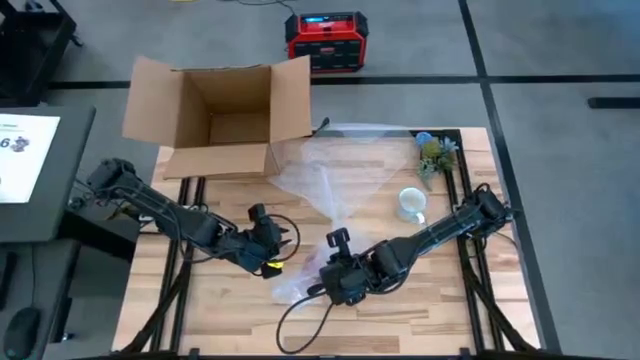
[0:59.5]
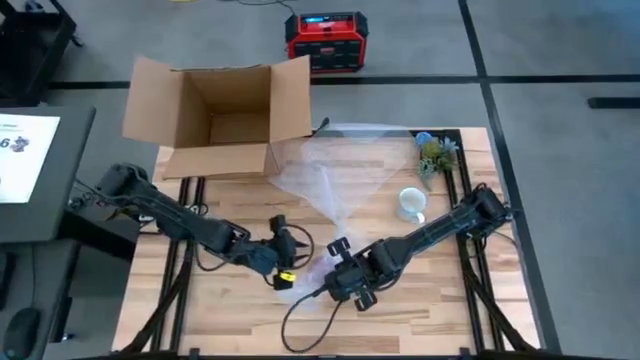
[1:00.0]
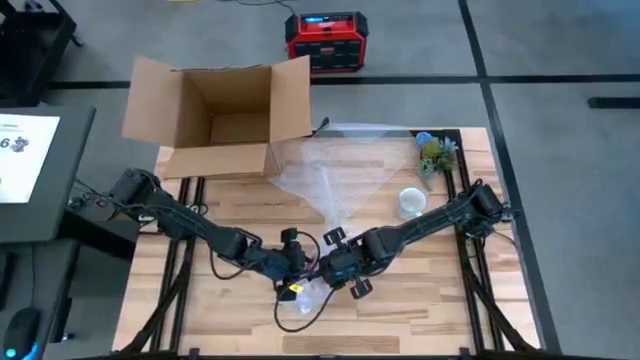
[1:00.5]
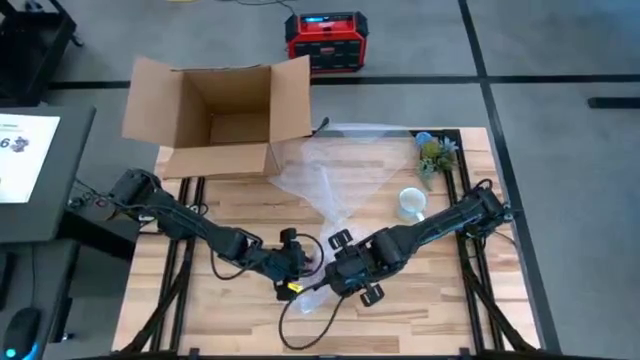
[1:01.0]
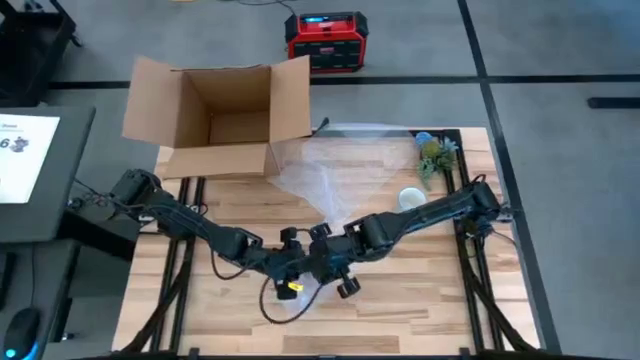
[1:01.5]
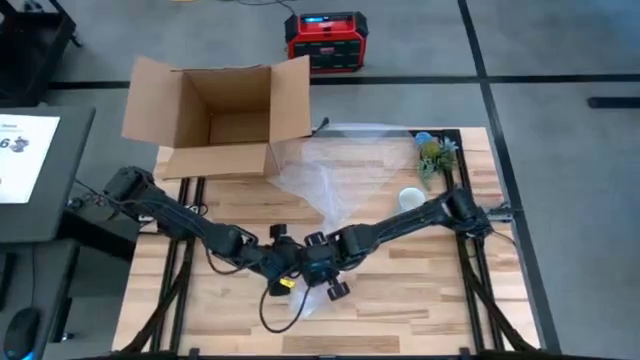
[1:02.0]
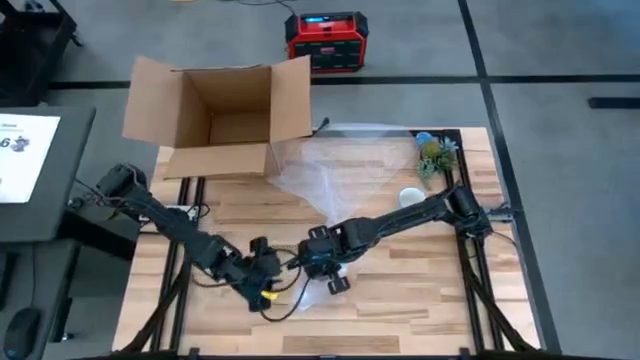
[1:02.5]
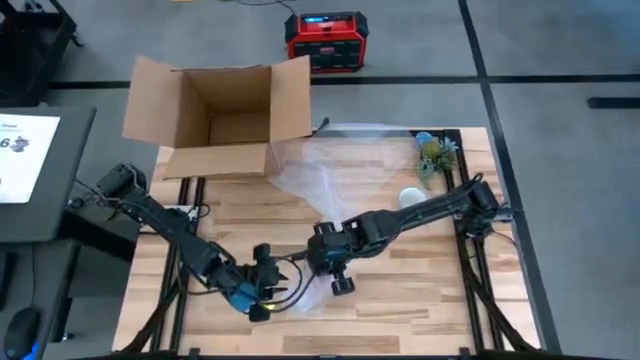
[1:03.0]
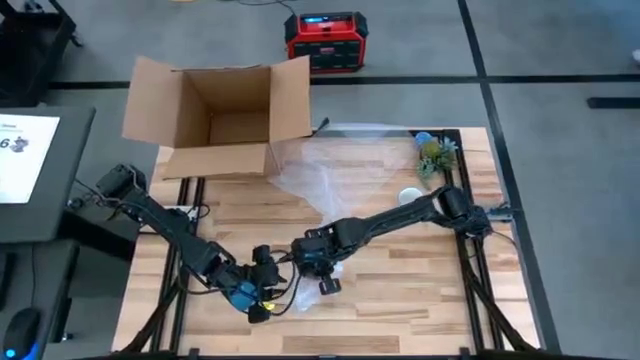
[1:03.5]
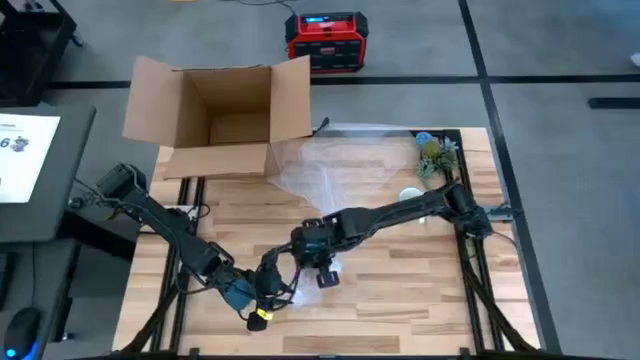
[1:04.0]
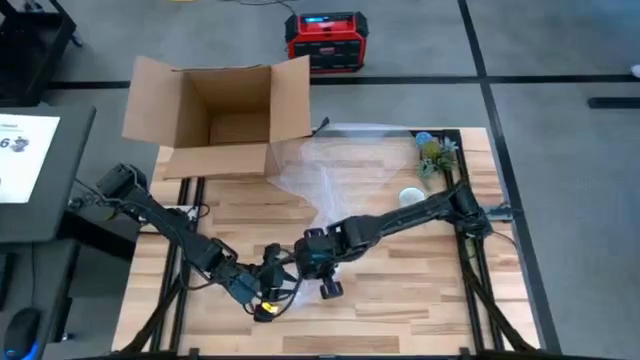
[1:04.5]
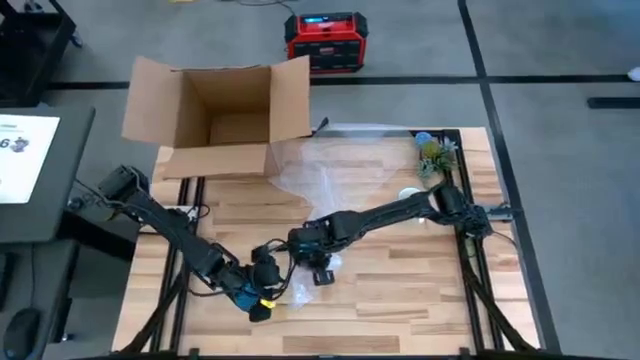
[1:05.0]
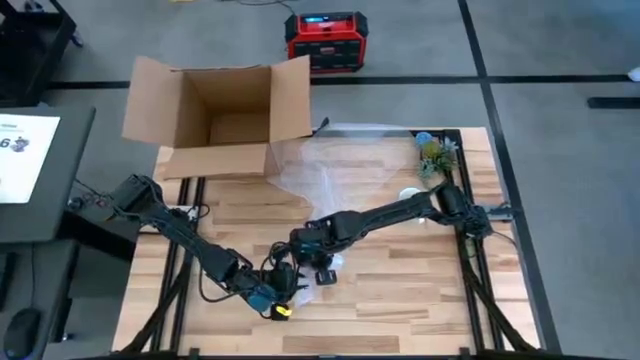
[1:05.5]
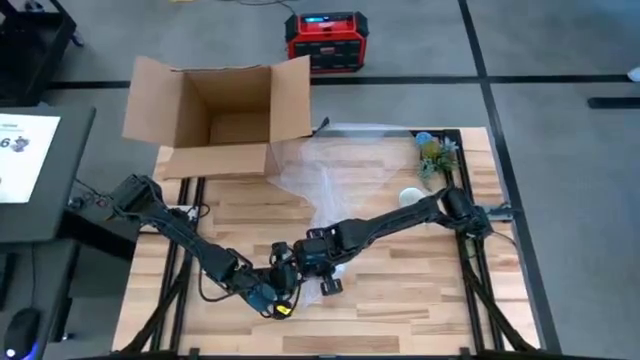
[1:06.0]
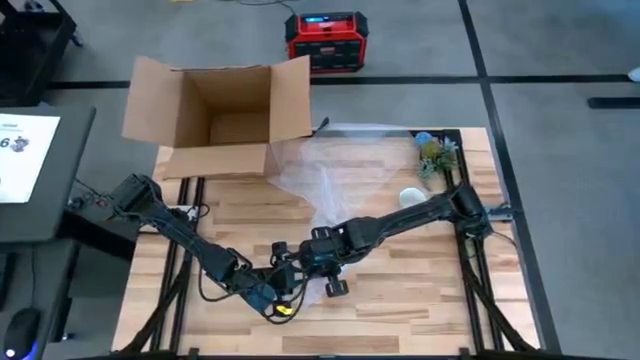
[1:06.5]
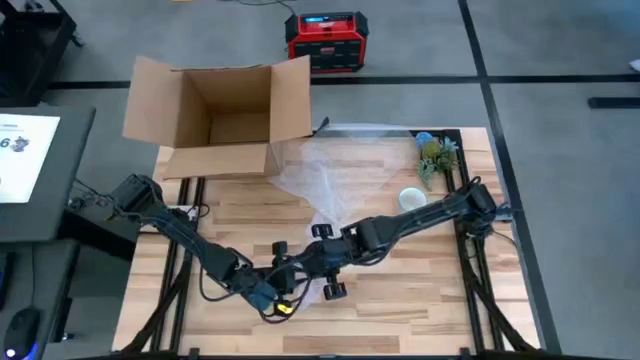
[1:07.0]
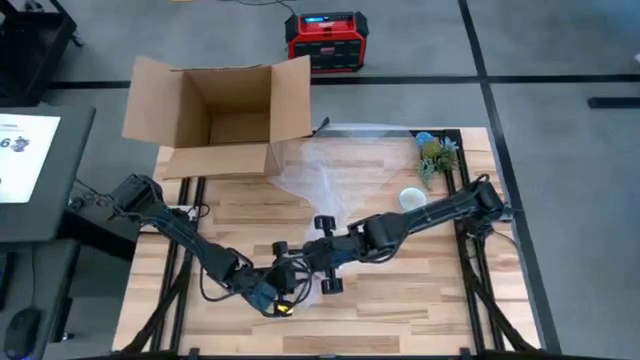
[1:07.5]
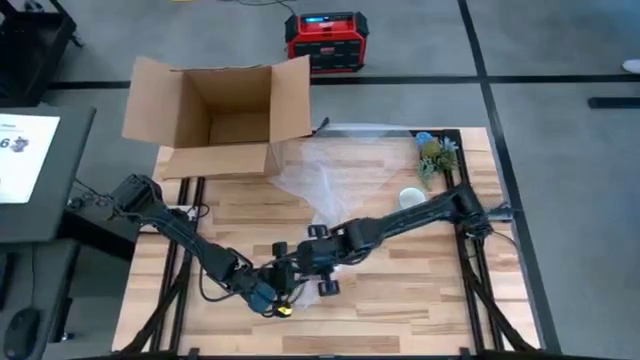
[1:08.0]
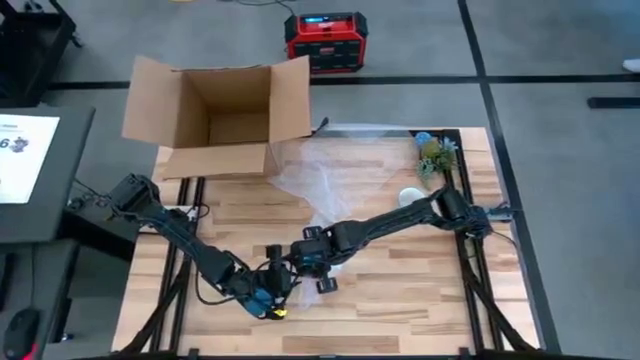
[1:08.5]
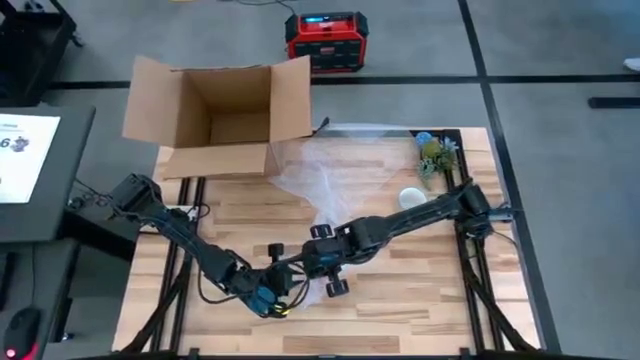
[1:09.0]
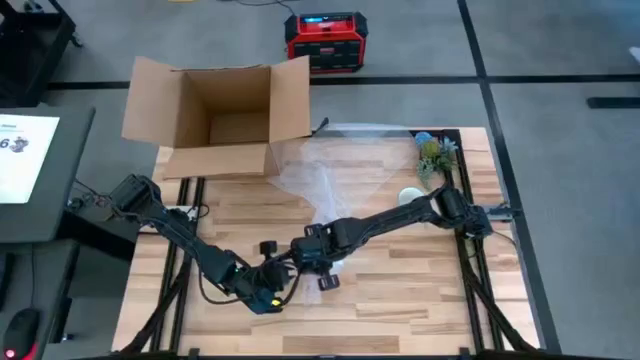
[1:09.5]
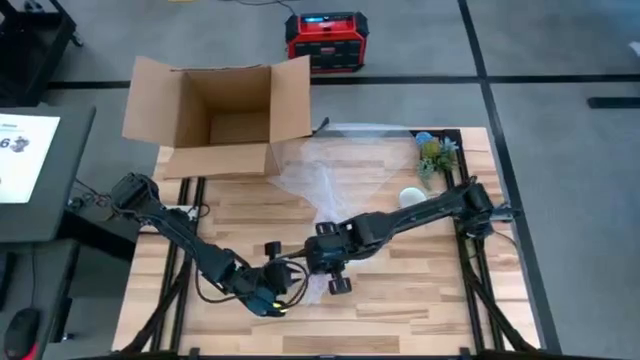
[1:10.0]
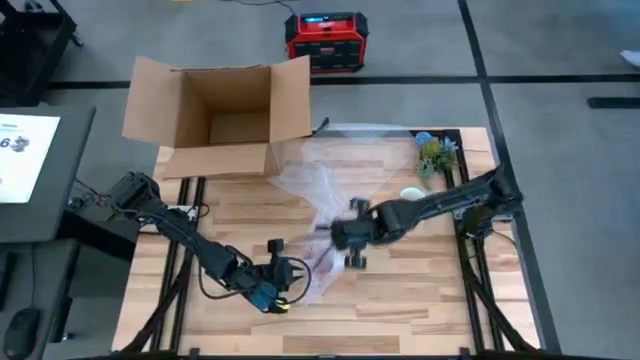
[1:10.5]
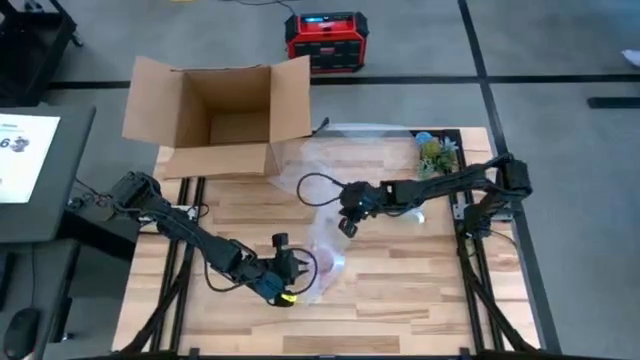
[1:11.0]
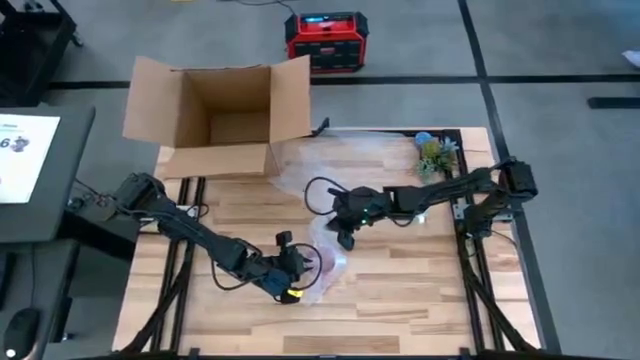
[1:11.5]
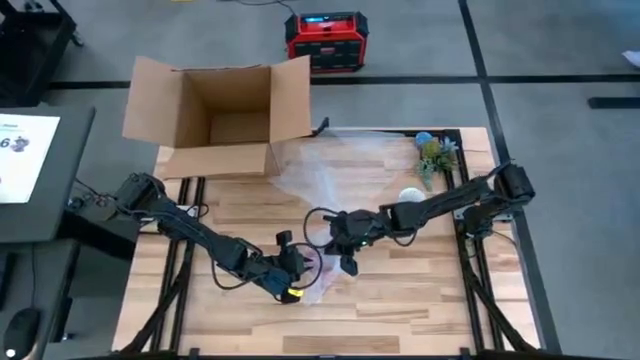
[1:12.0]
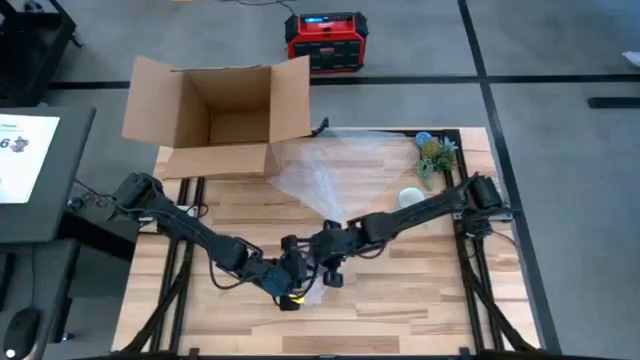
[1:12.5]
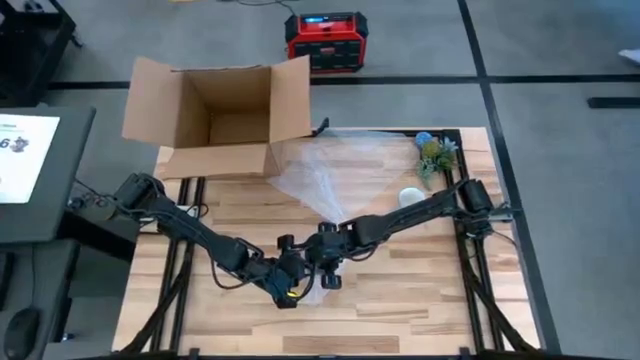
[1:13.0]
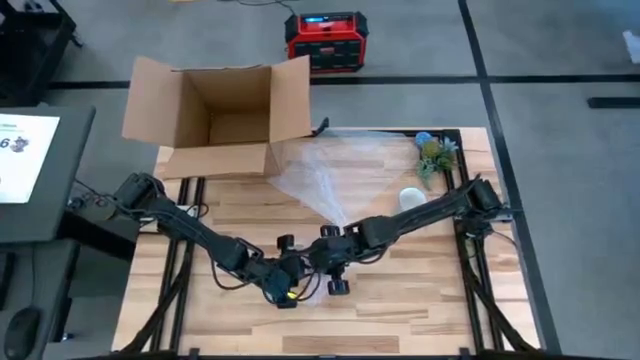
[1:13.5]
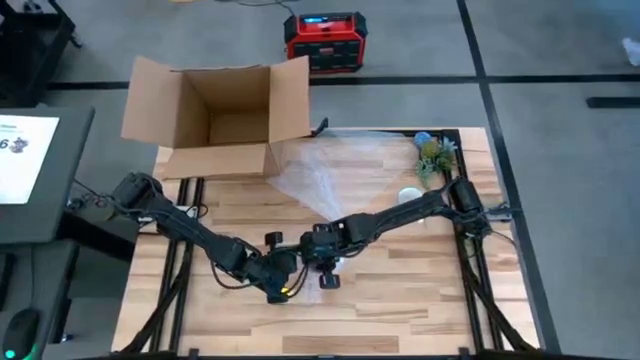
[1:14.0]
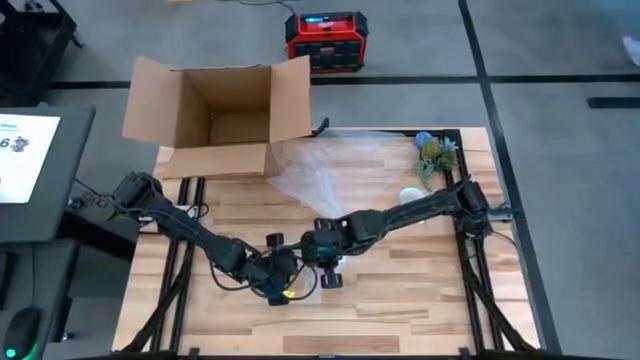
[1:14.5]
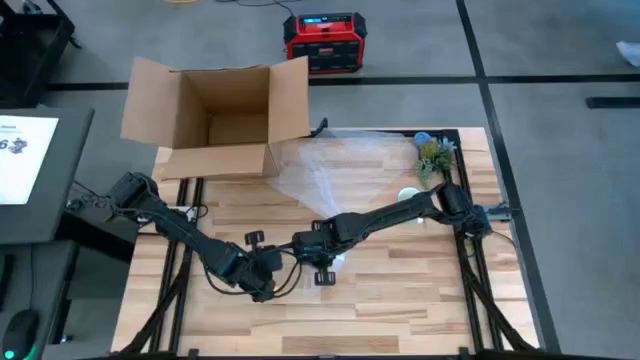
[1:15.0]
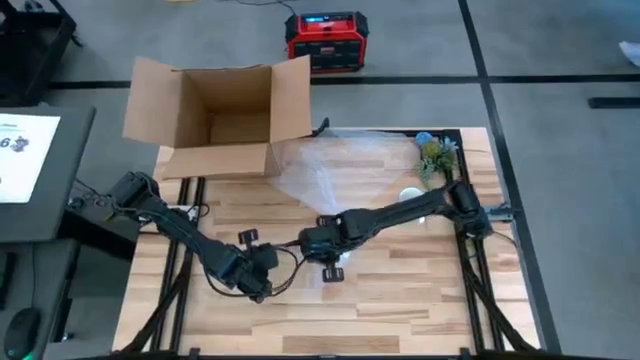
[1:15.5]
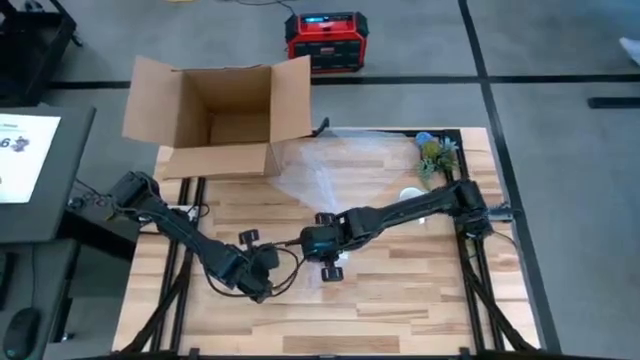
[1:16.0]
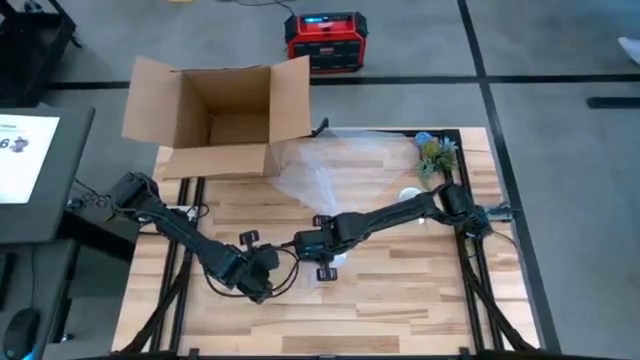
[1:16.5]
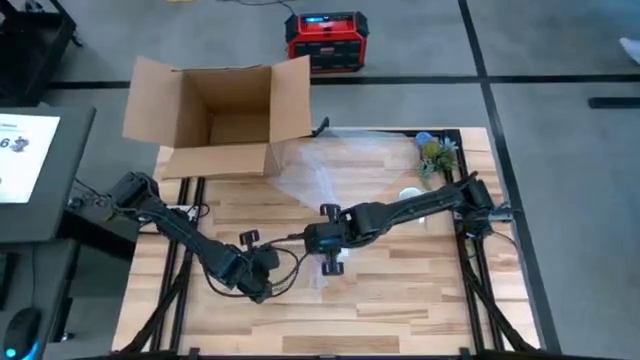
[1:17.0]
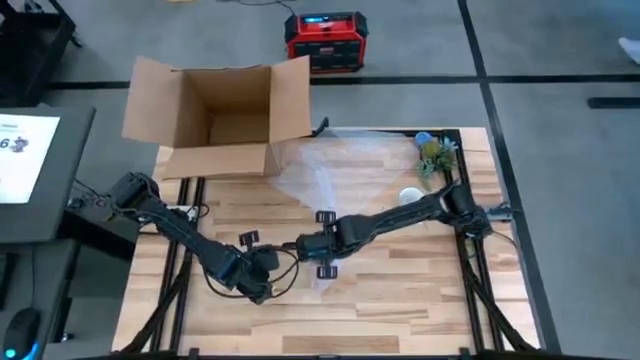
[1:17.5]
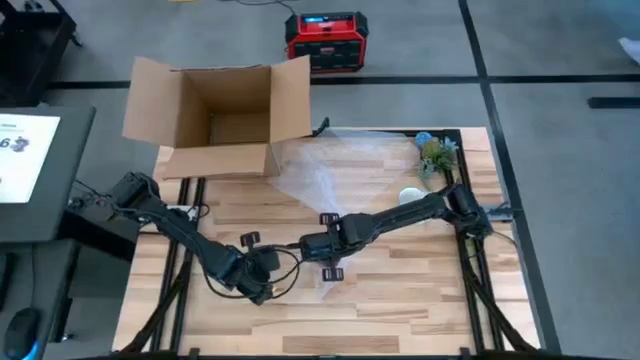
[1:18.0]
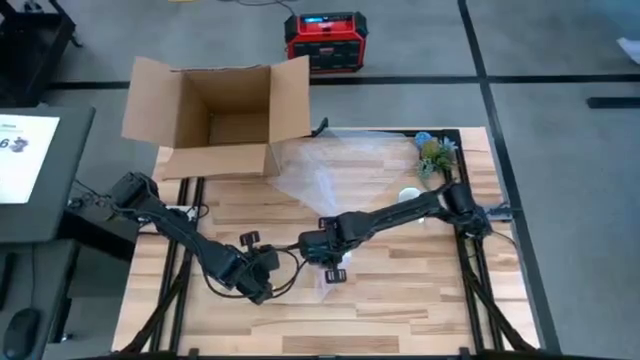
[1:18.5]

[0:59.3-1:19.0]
Task: wrap mug
Wrap the red mug with bubble wrap

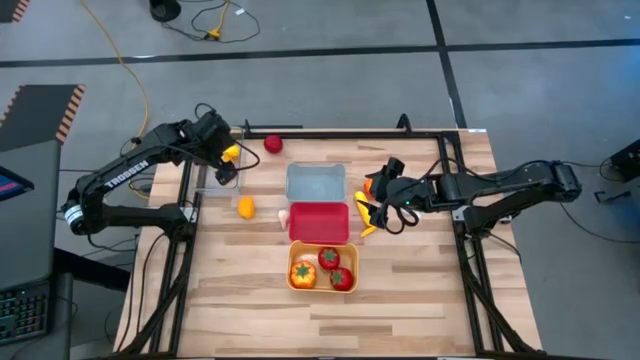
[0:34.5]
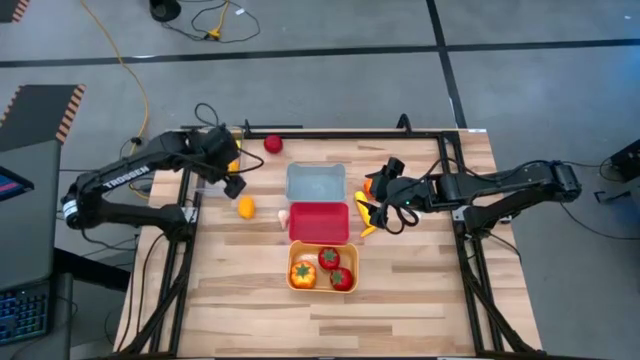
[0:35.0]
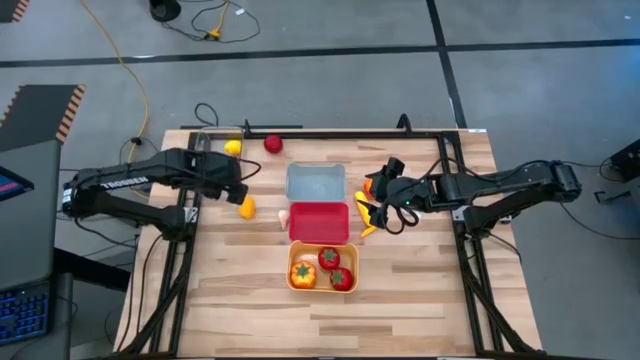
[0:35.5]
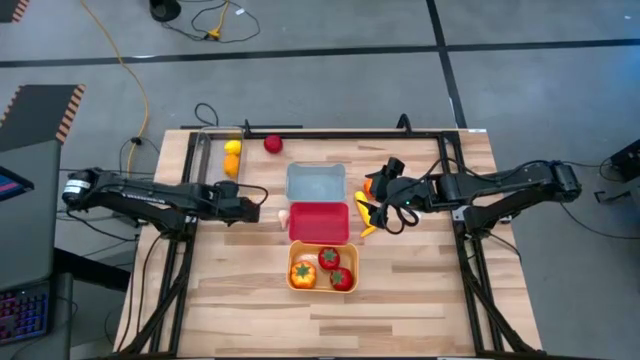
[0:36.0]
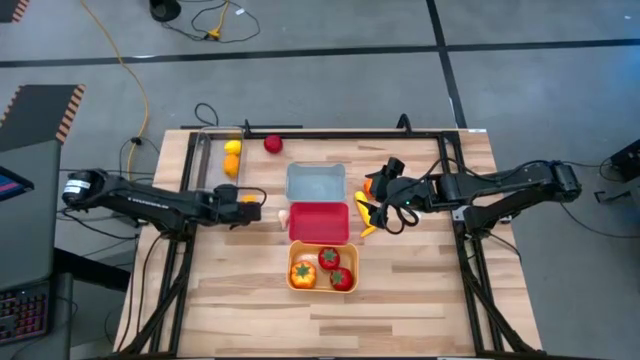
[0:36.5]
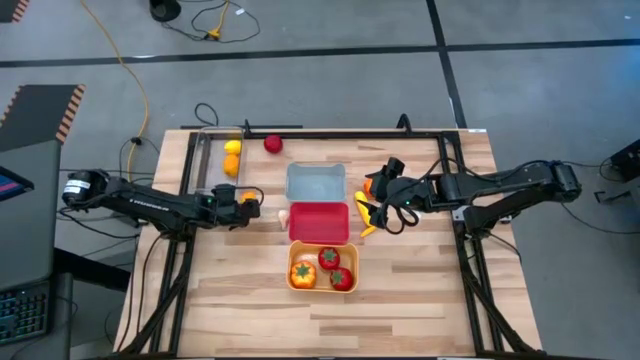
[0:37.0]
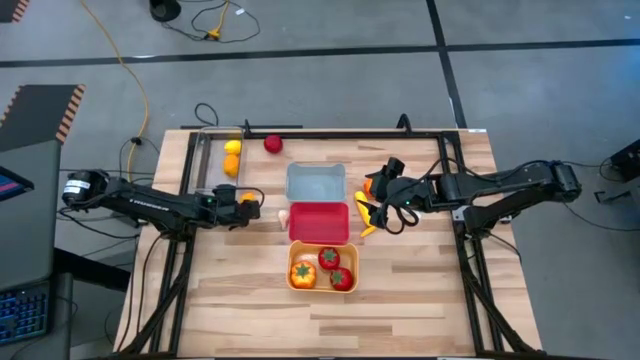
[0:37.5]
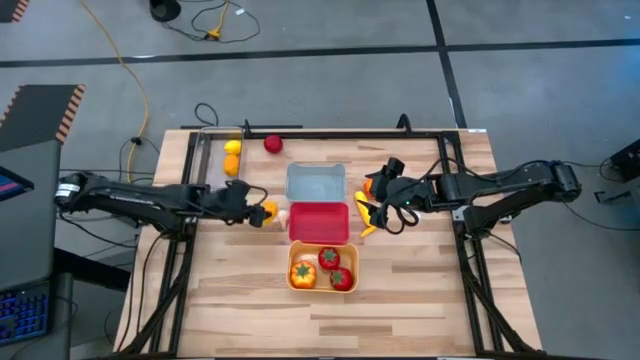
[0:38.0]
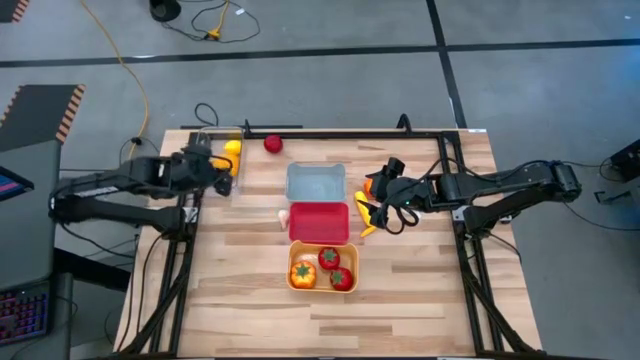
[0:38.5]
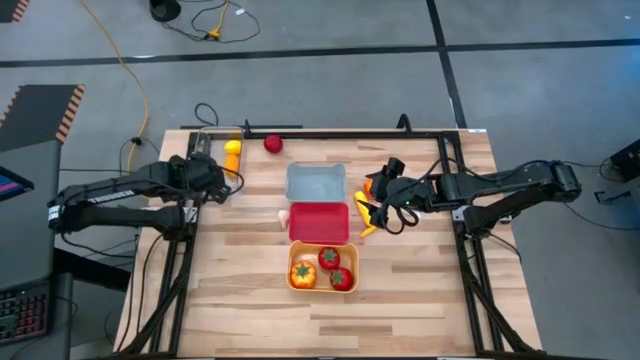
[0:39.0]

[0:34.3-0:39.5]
Task: Sort produce into baskets
Put the yellow lemon into the transparent bin
